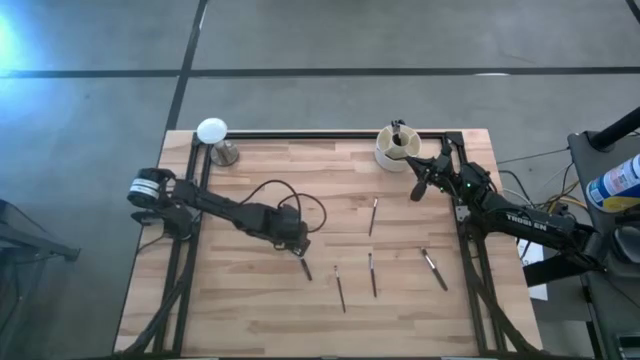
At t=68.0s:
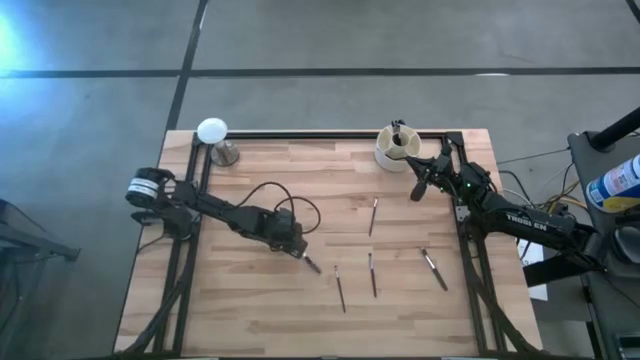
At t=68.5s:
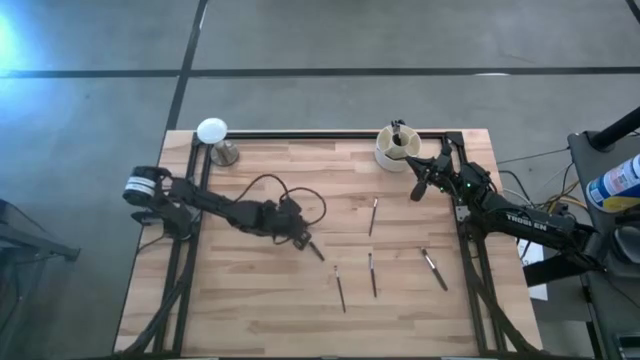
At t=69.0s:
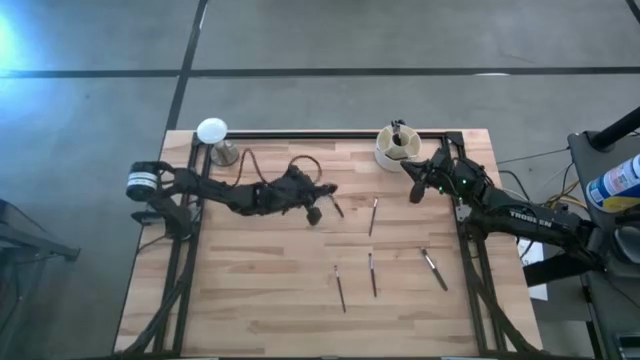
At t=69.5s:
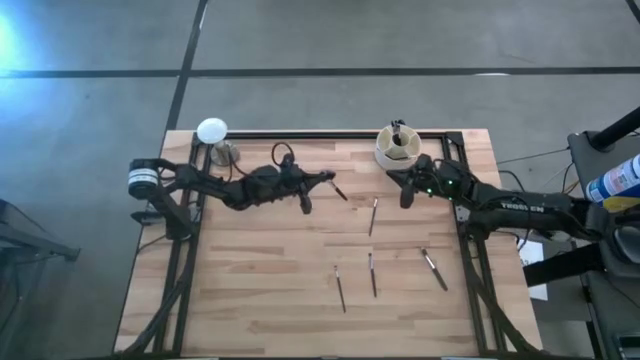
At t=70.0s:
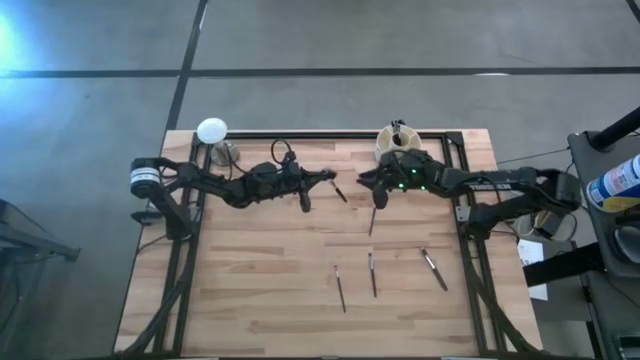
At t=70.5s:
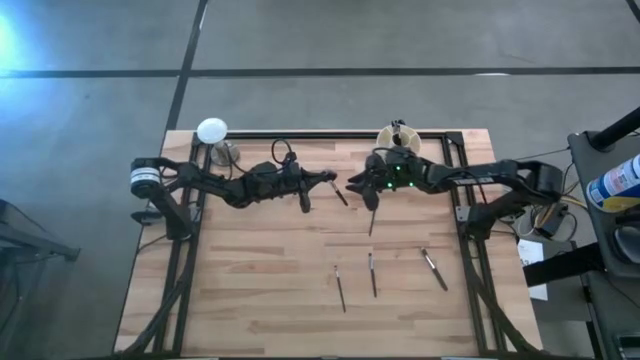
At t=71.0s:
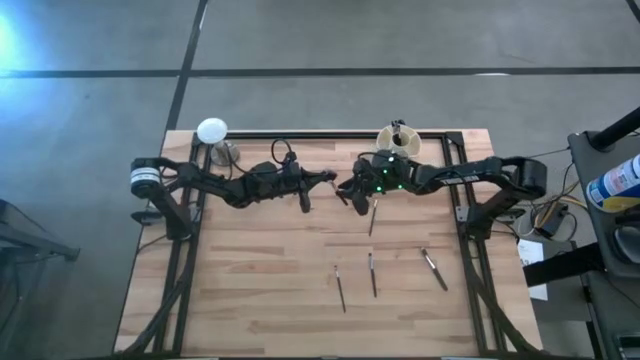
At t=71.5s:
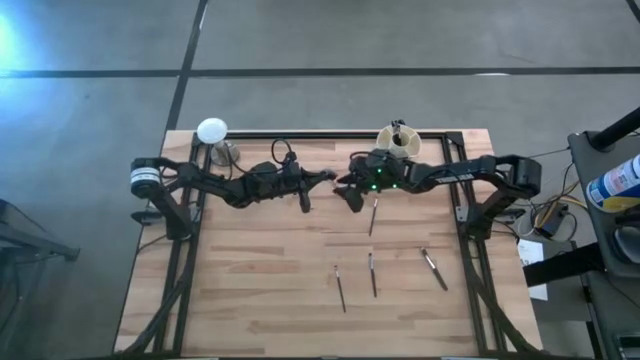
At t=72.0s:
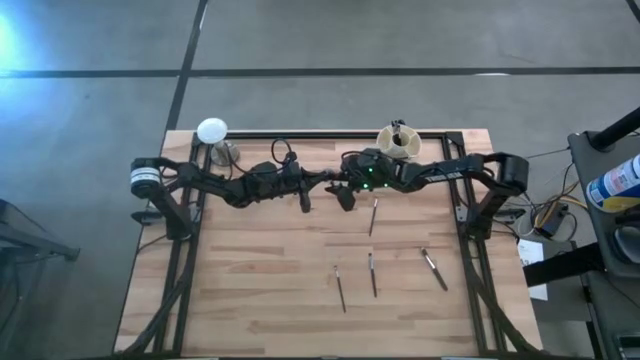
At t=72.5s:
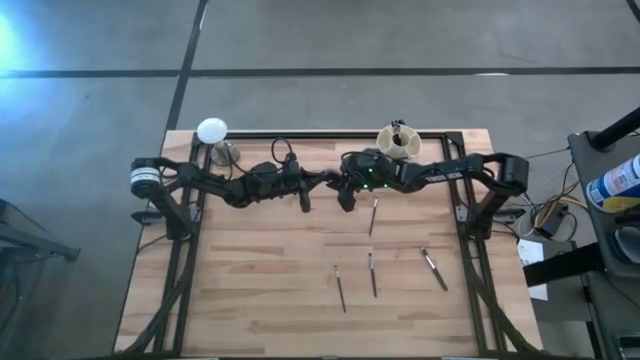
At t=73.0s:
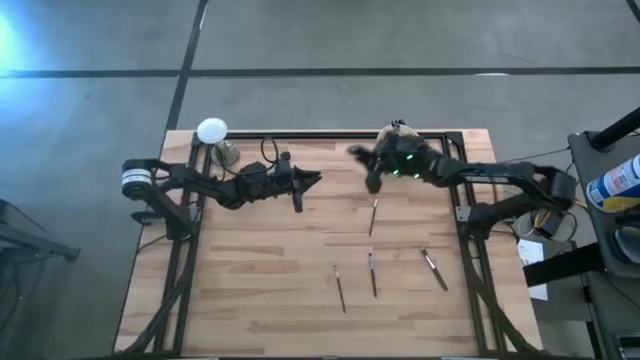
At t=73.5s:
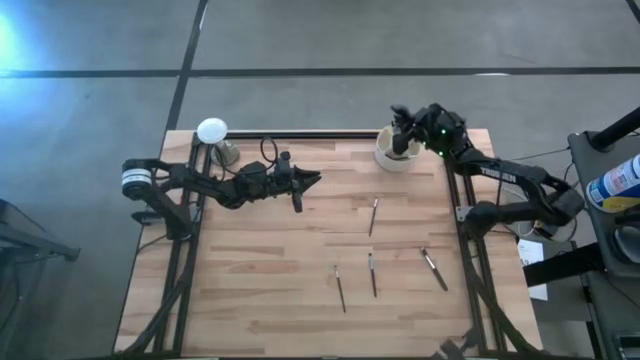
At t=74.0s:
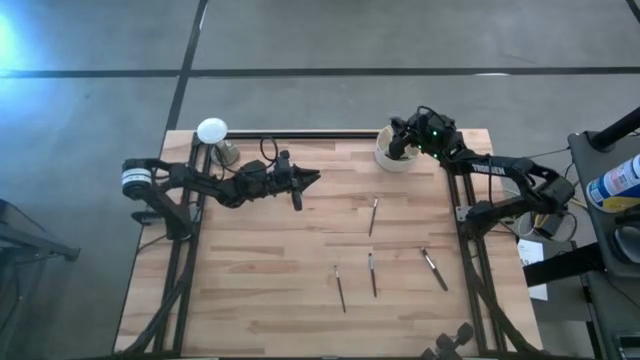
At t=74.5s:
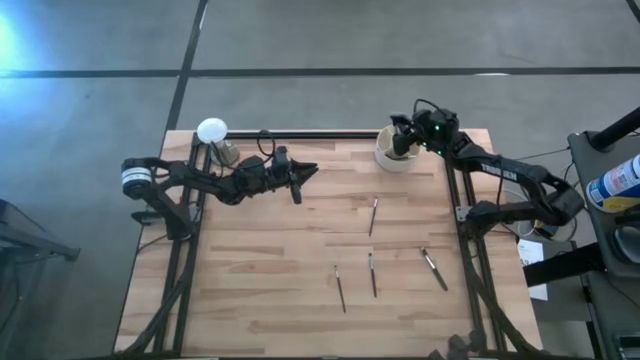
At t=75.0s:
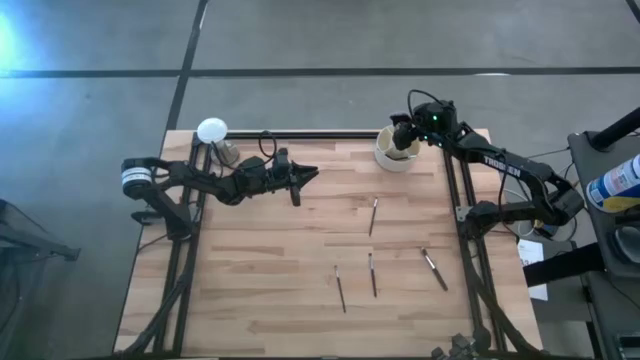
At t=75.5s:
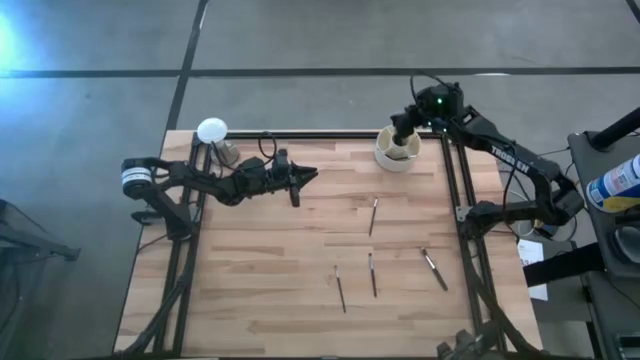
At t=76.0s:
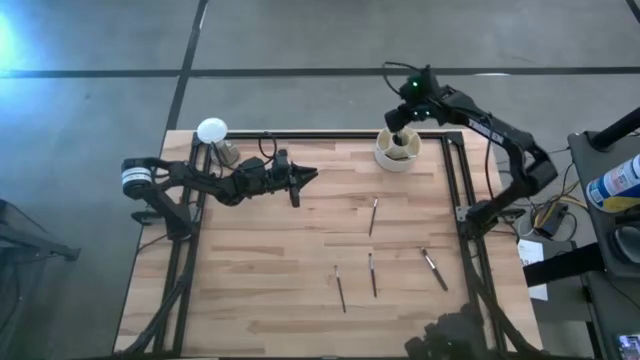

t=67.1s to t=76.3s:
Task: Put items in baskets/containers
Put the black highlighter brush into the white pen organizer

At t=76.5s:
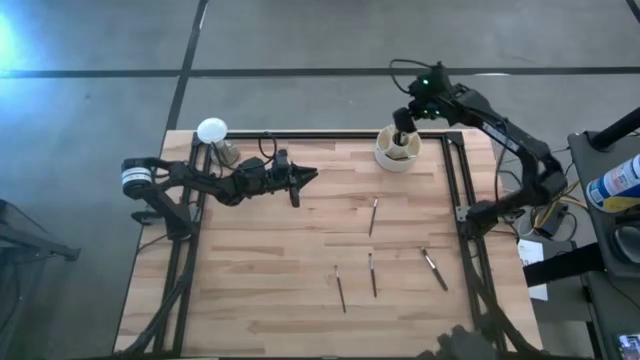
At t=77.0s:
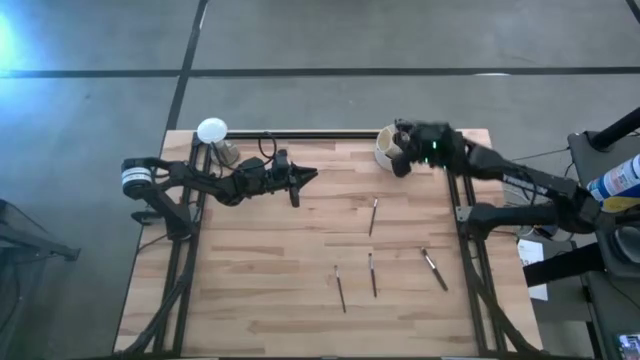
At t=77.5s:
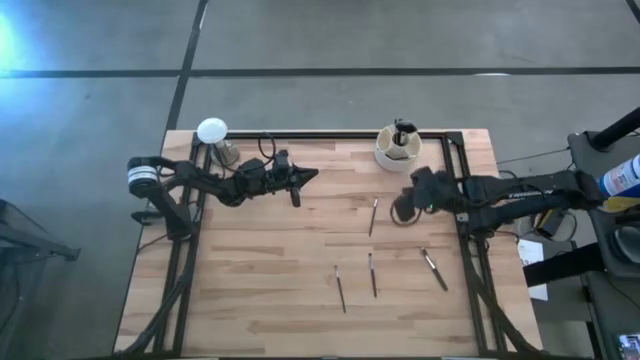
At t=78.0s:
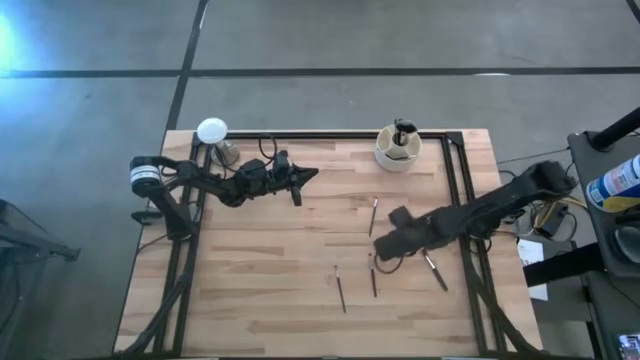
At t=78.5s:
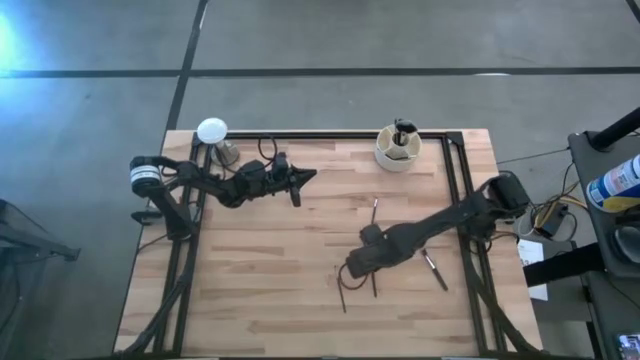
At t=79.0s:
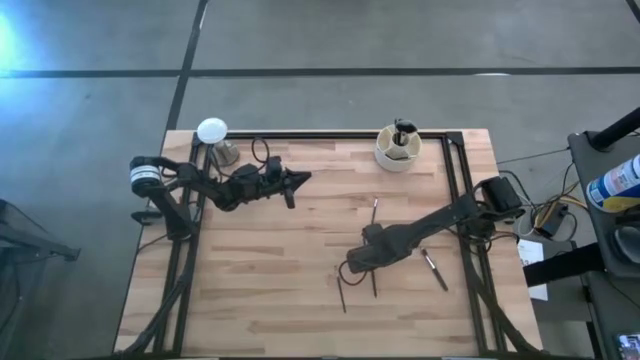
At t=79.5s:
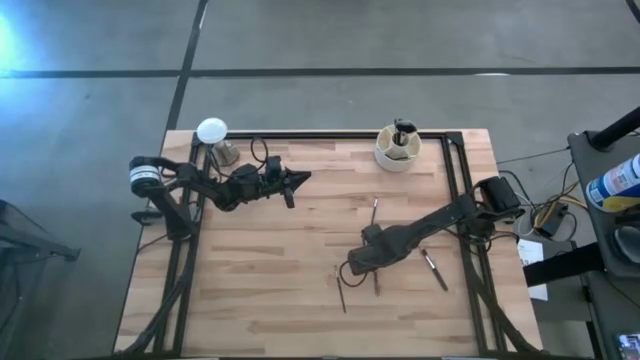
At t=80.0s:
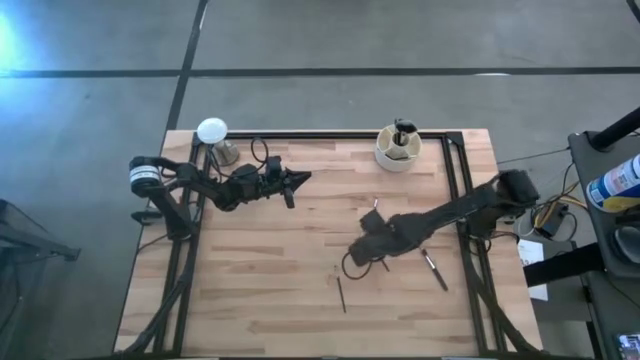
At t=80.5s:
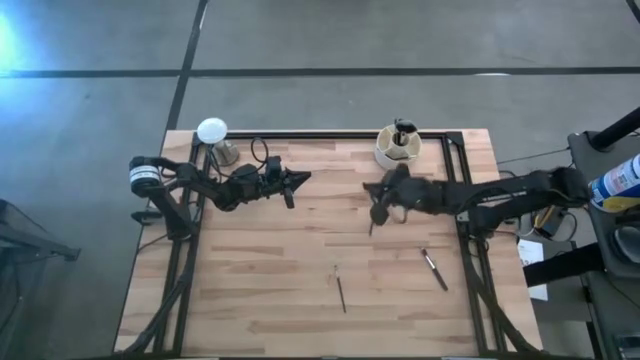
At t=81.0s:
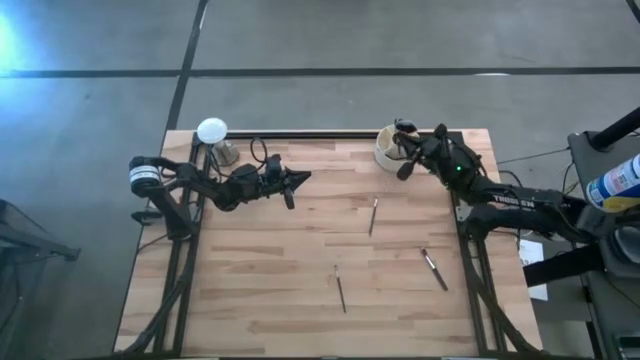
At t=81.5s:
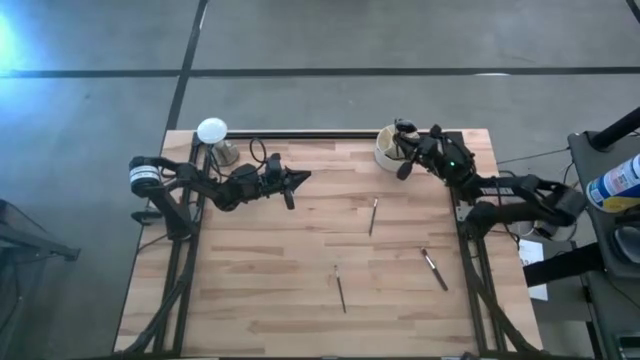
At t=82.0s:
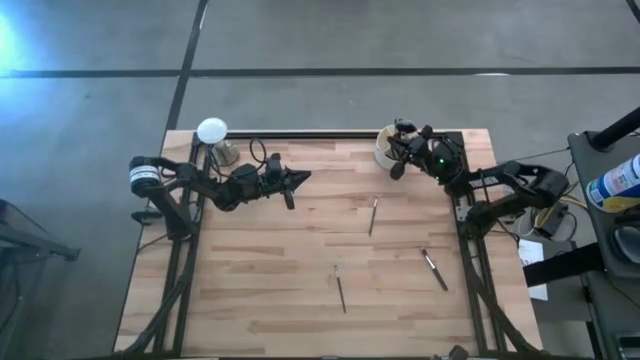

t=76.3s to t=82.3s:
Put the black eyeshadow brush into the white pen organizer

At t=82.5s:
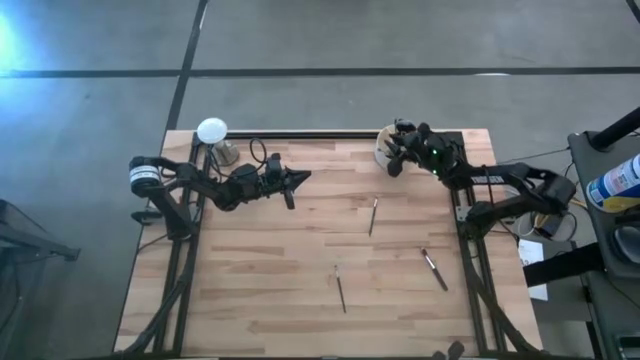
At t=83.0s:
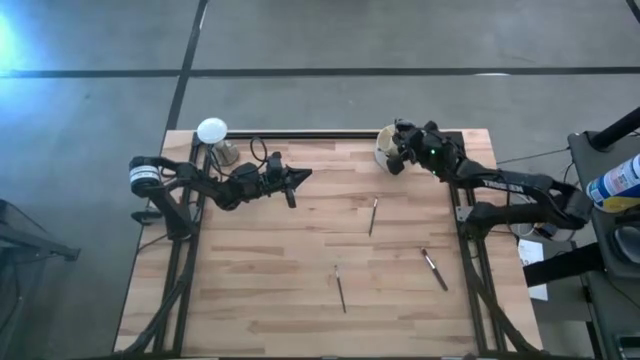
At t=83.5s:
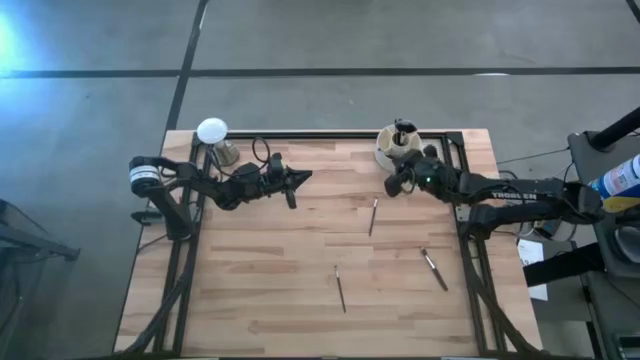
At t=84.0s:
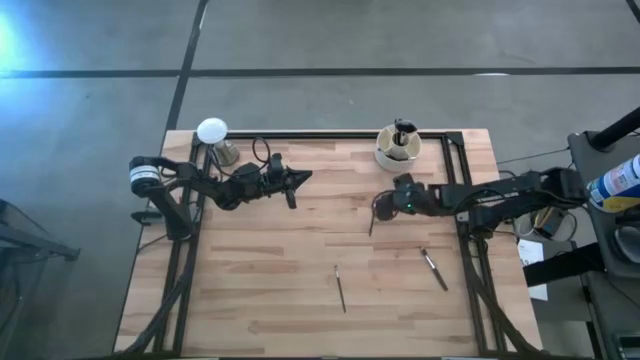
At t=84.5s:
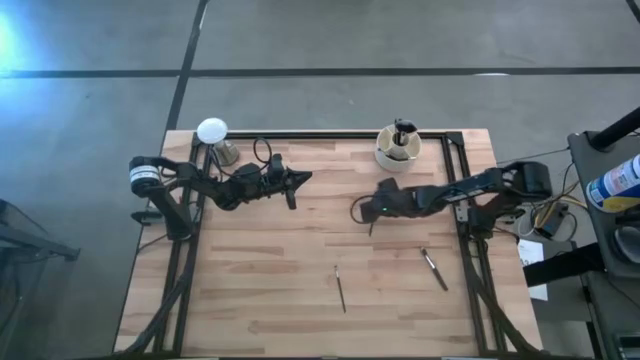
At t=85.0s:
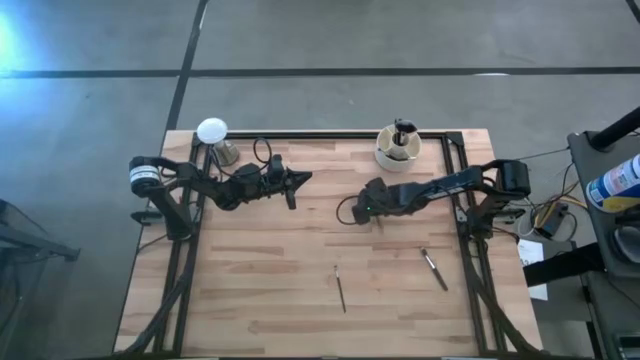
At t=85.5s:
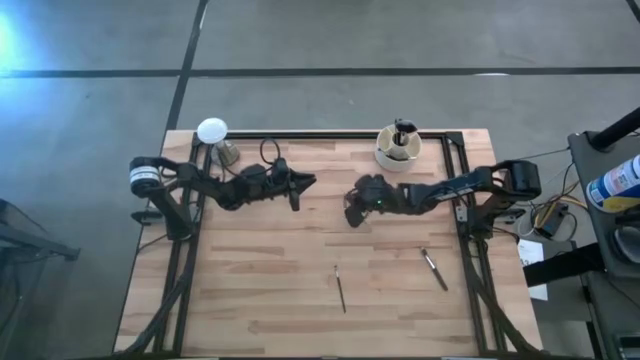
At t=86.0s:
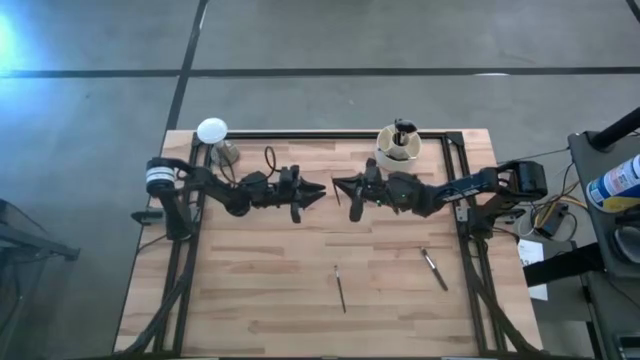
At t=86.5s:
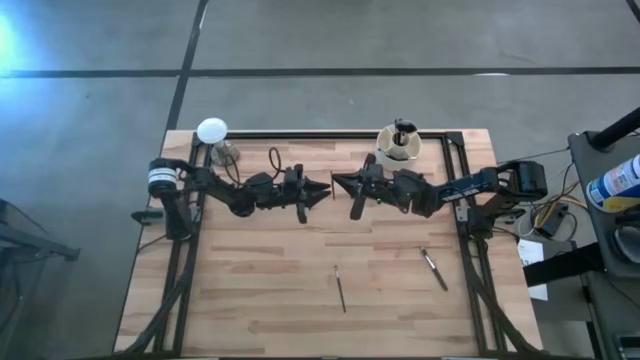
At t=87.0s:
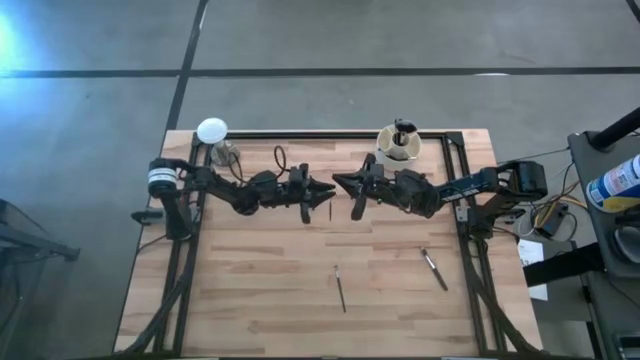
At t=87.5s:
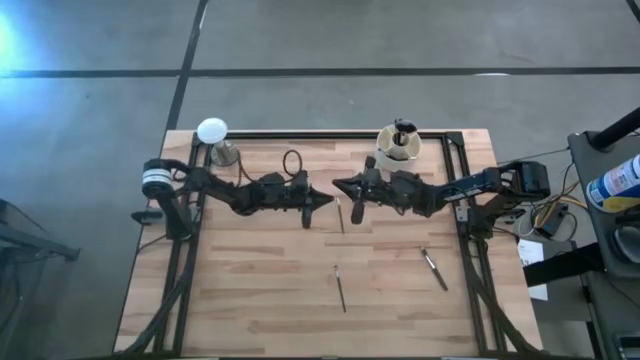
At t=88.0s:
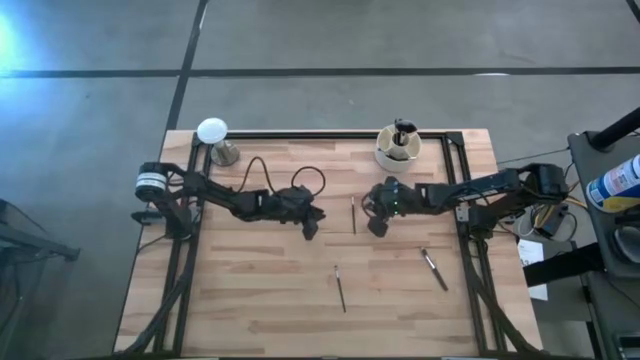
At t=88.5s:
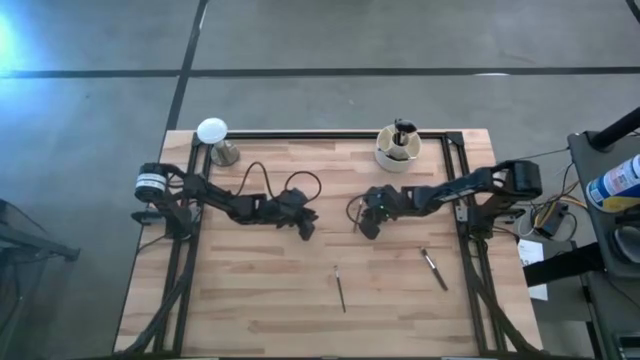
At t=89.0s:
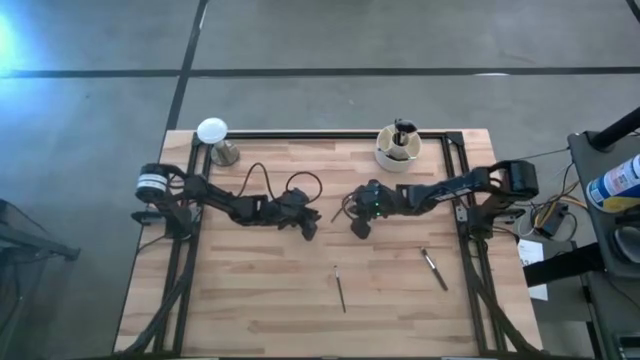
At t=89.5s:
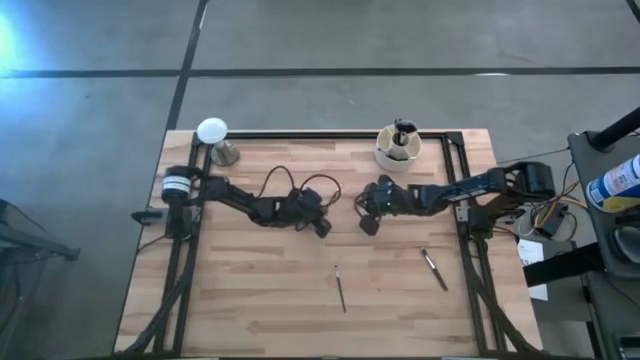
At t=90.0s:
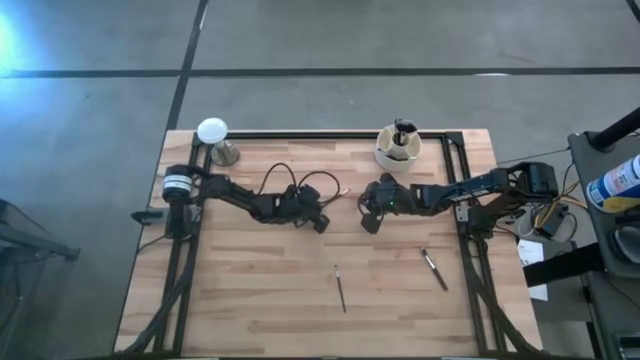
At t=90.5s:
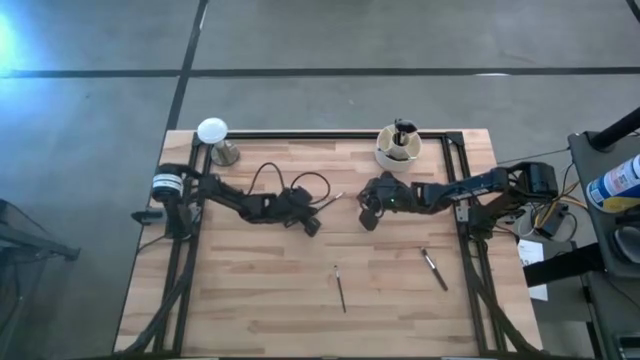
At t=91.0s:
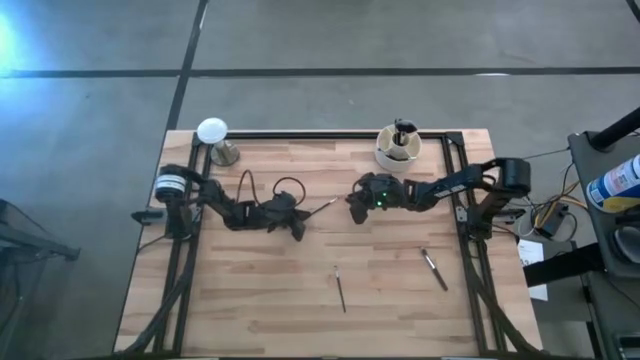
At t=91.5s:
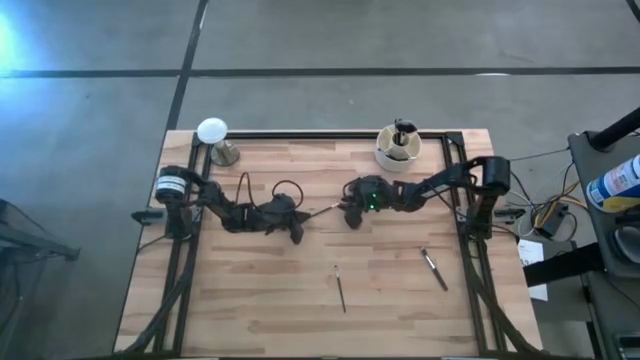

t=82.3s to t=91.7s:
Put the black eyeshadow brush into the white pen organizer
